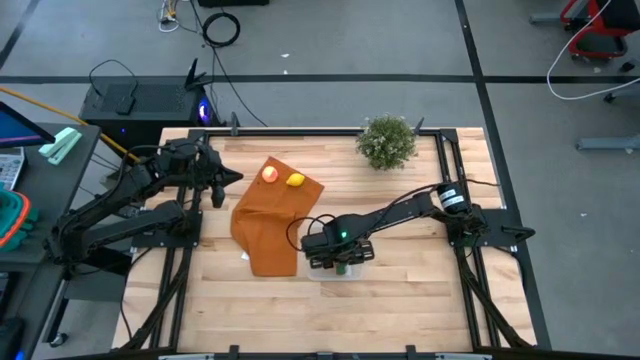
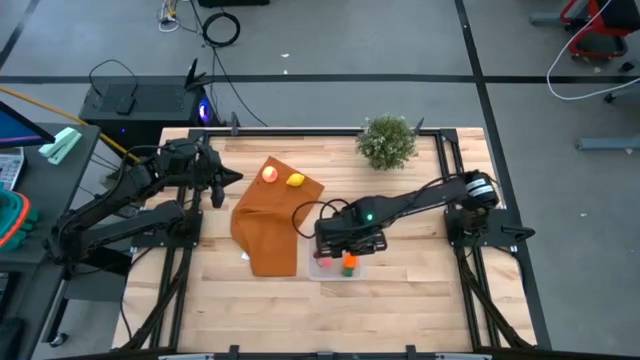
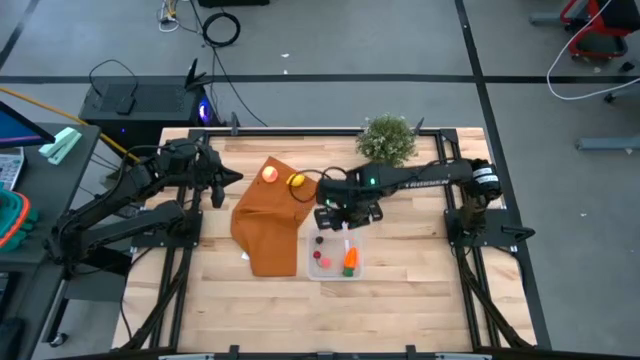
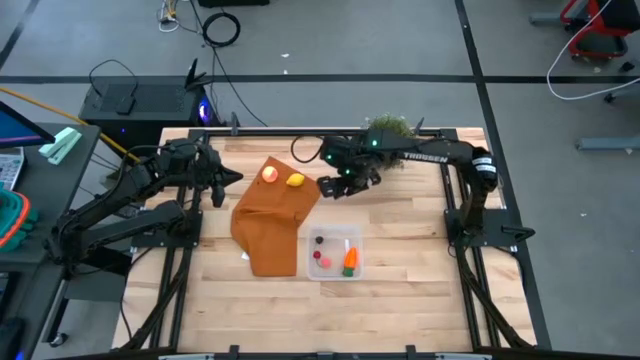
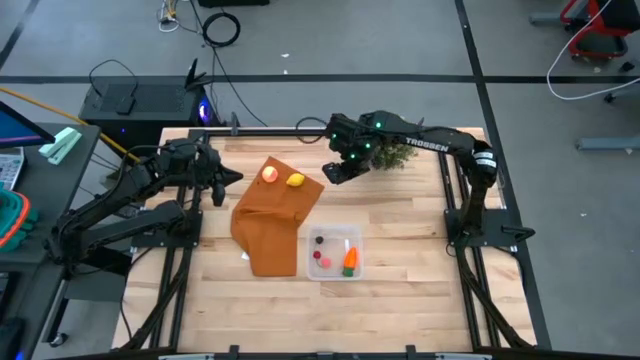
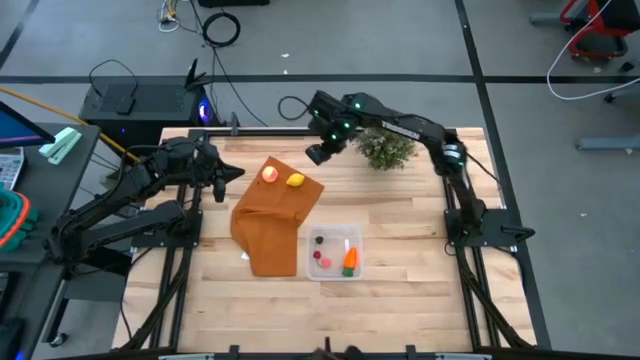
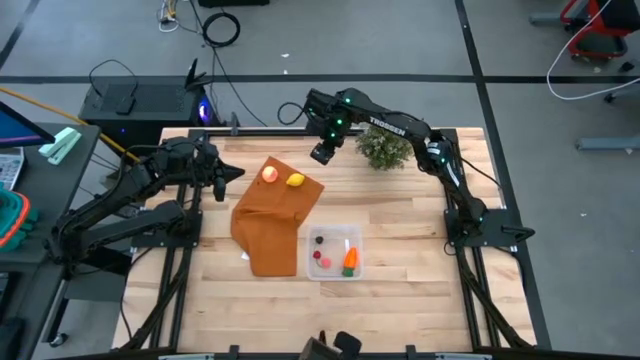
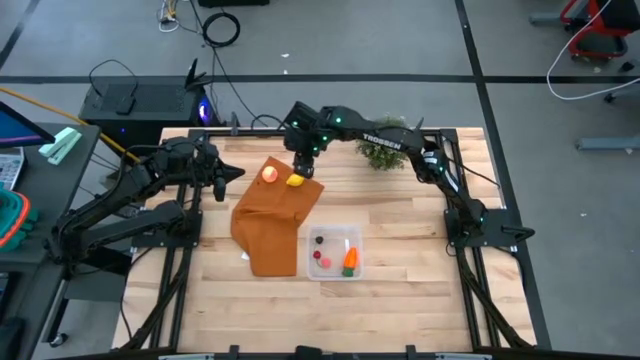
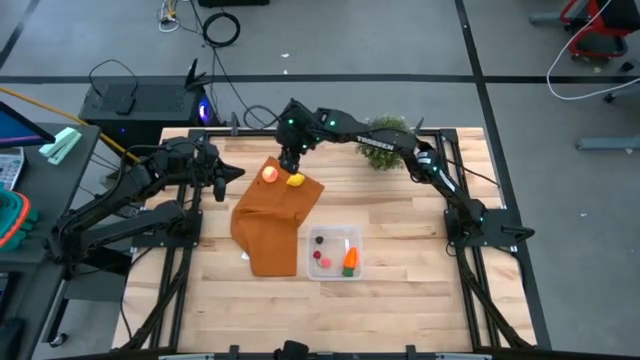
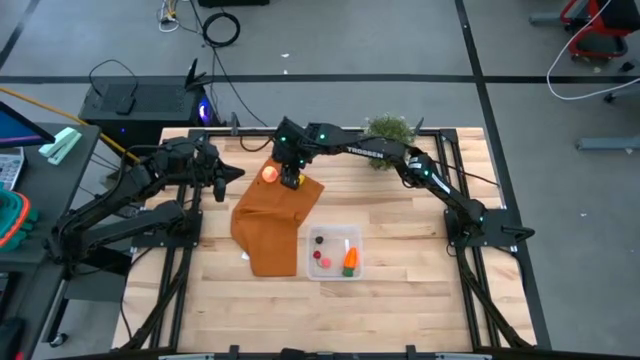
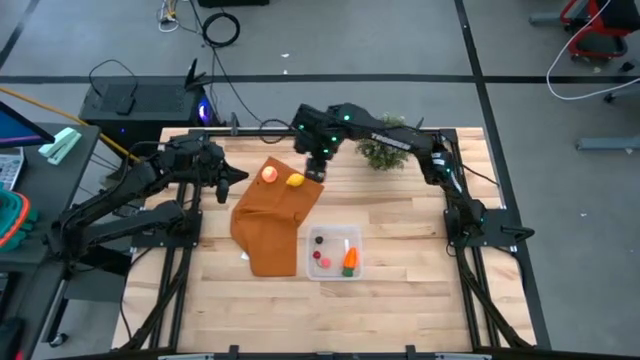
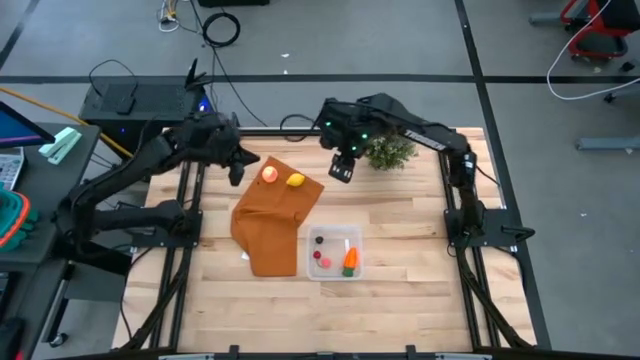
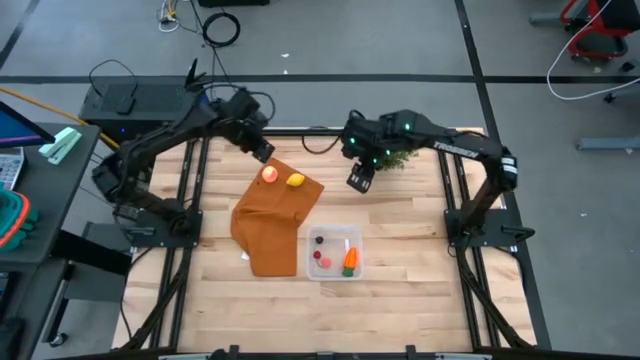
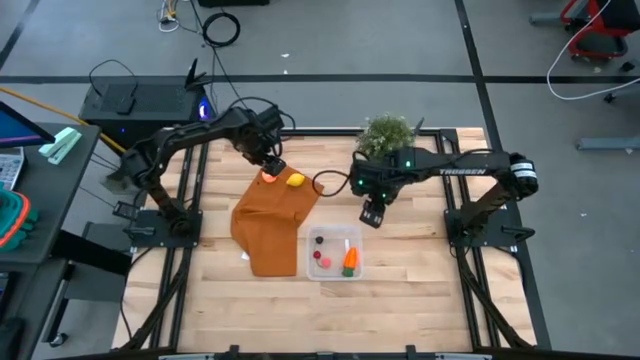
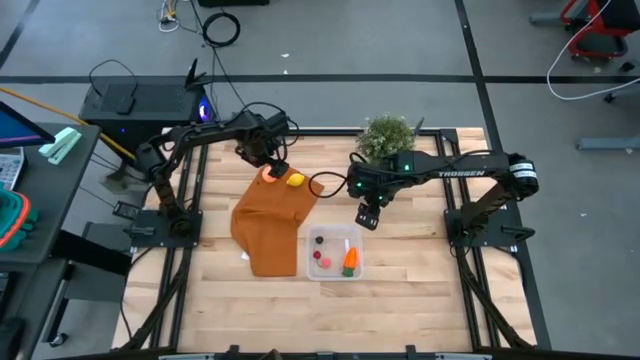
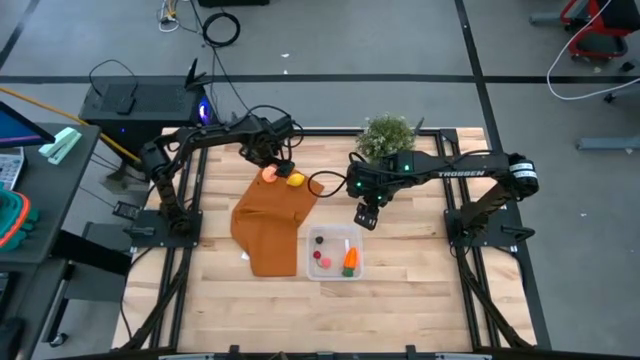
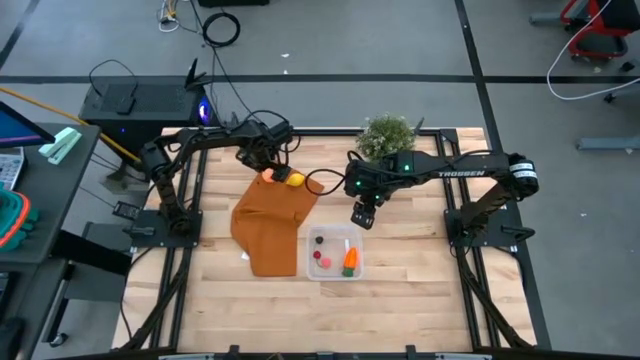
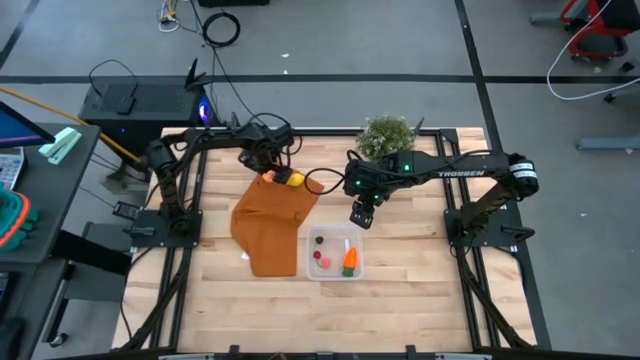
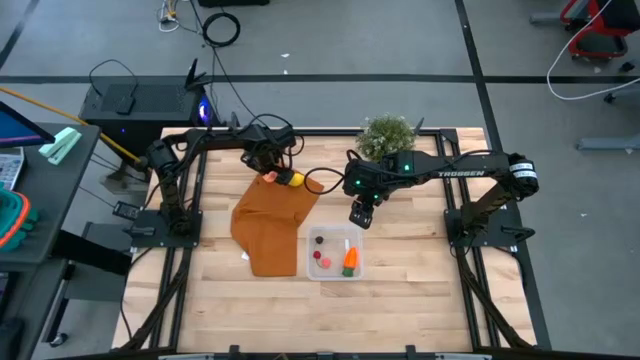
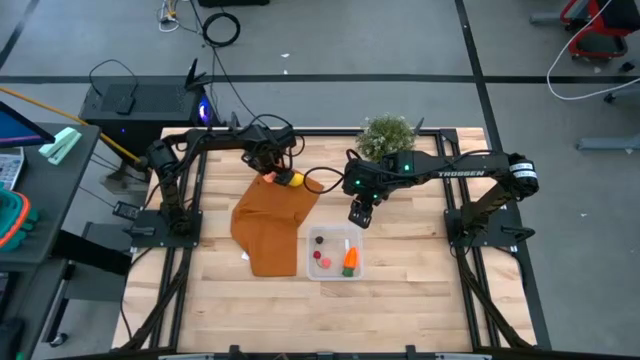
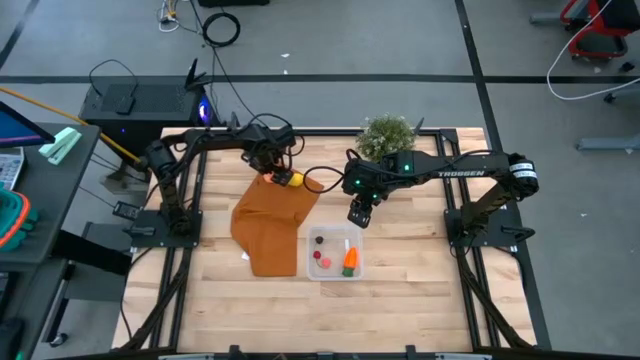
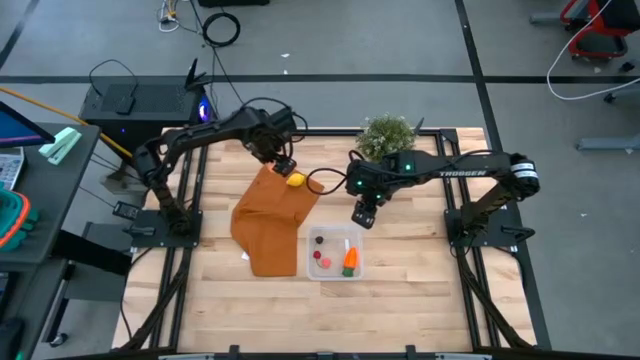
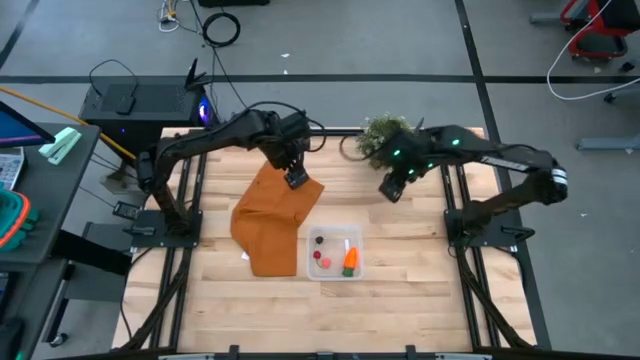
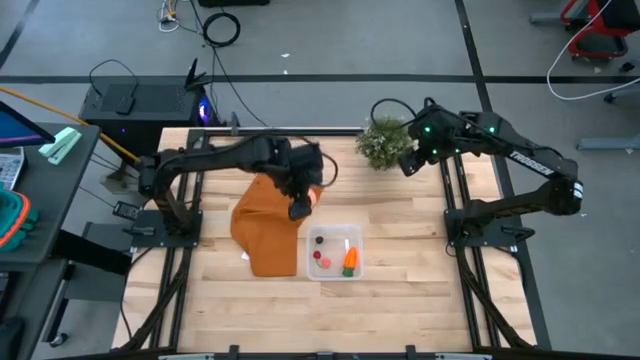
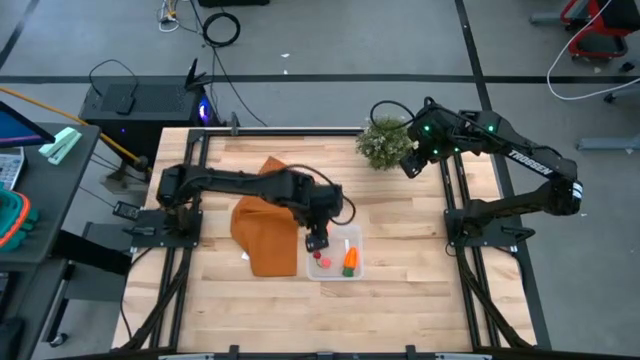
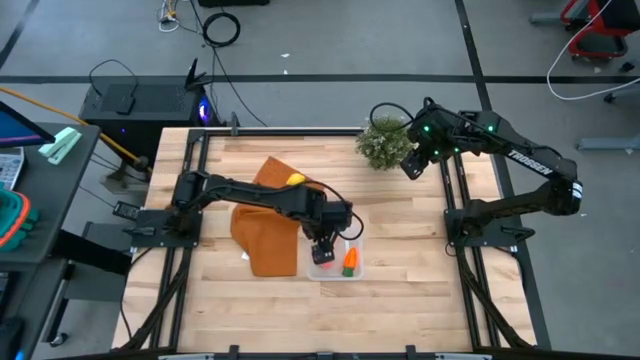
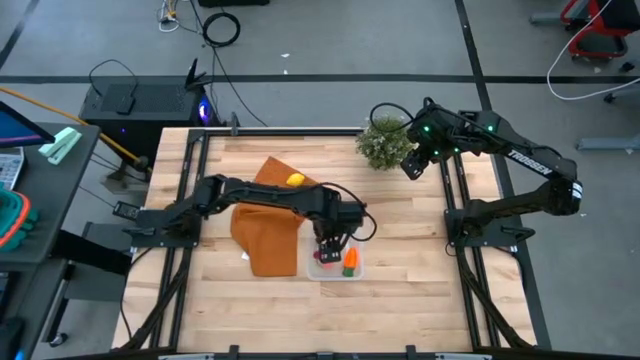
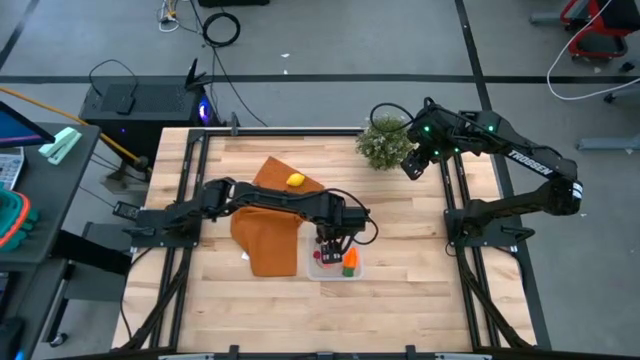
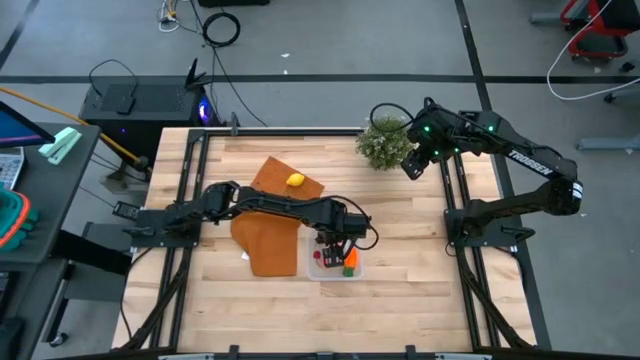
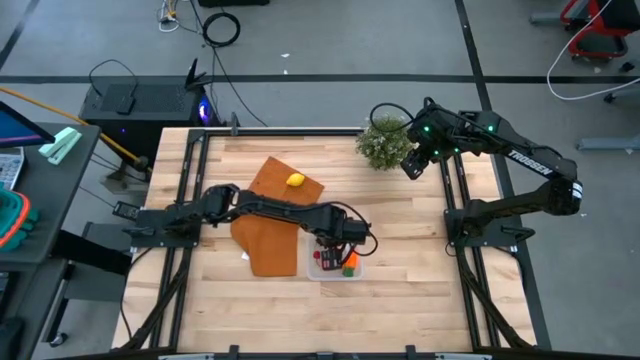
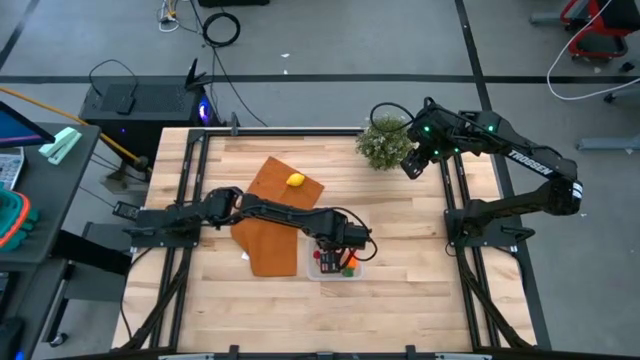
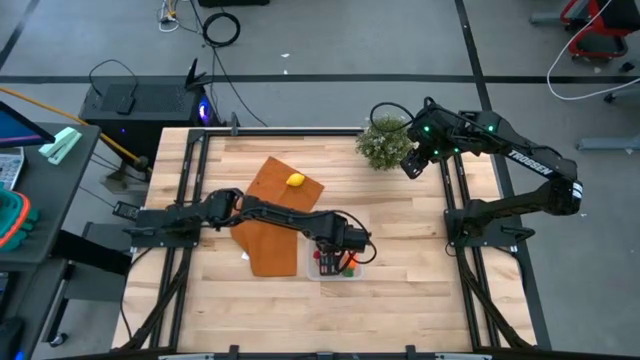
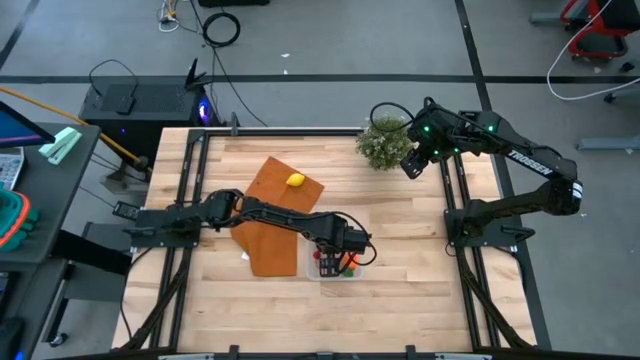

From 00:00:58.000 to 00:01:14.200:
Task: Pick and placing Produce into tupperware
Put the pink peach into the transparent bin

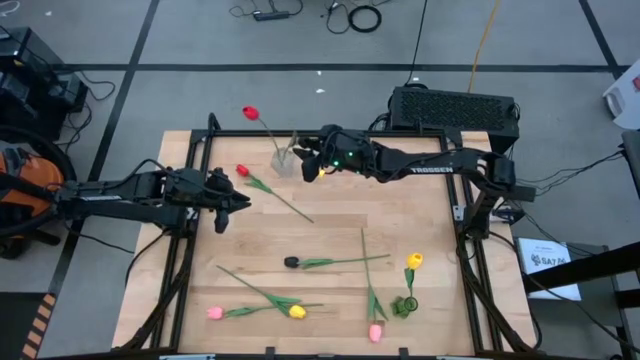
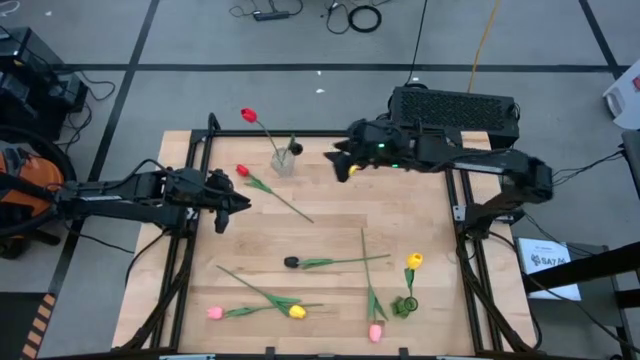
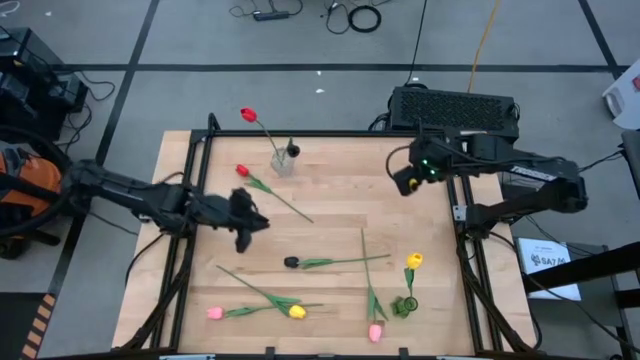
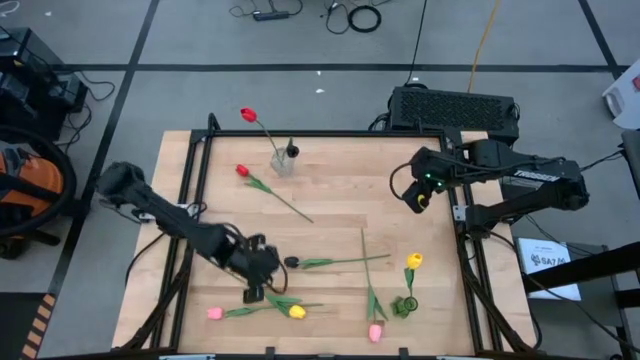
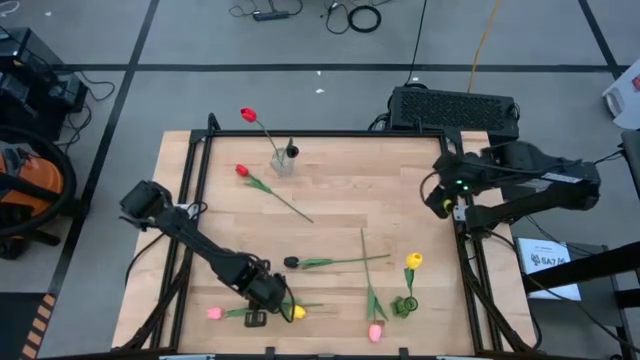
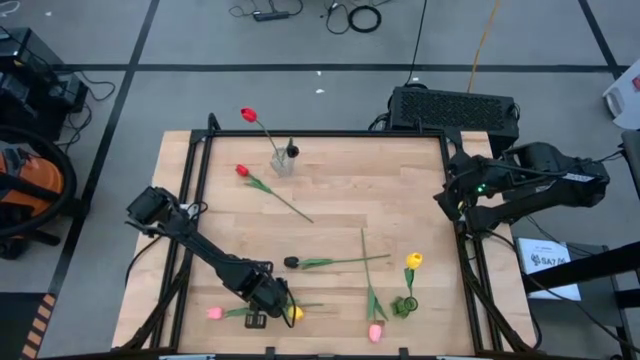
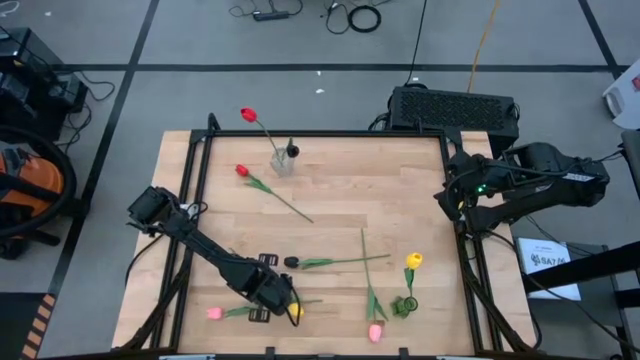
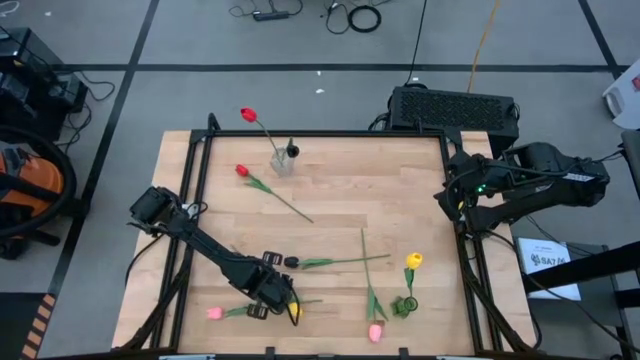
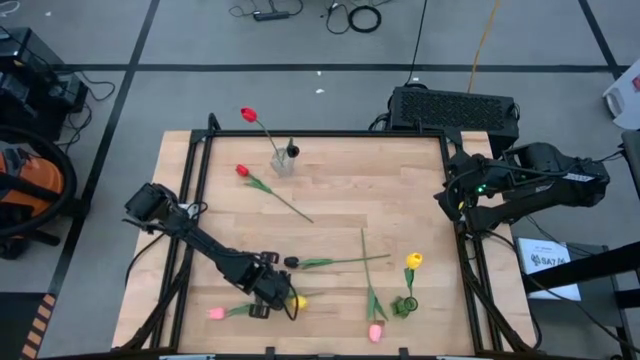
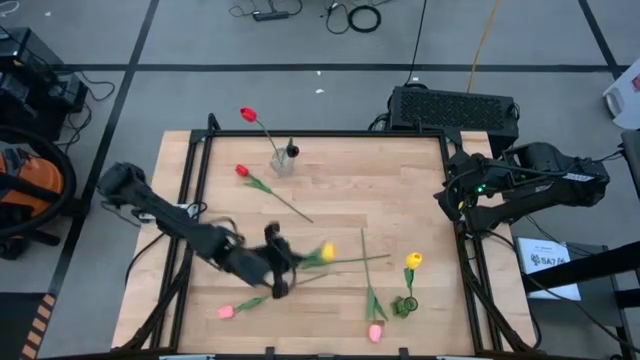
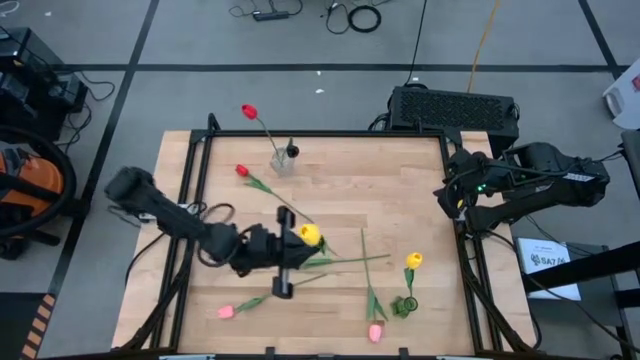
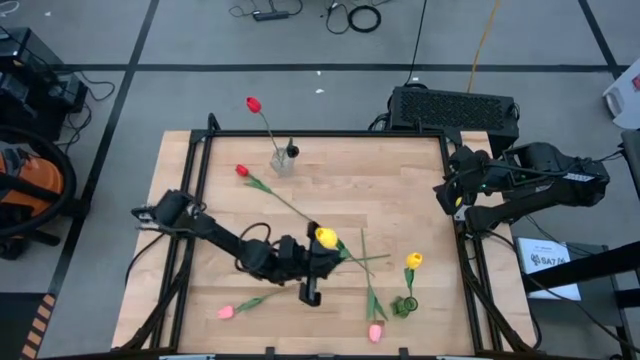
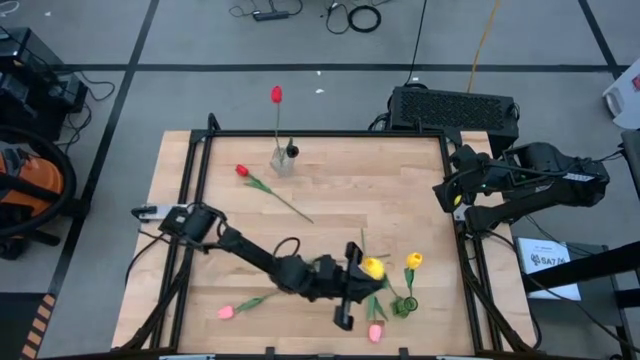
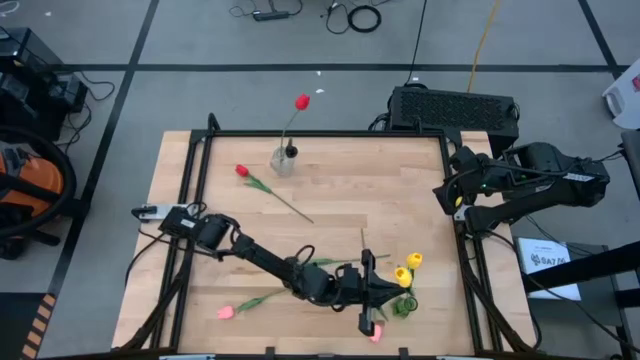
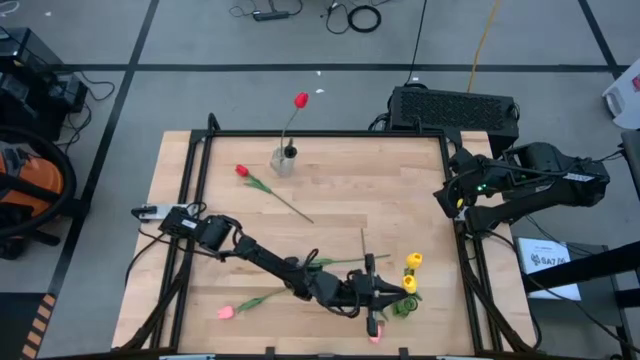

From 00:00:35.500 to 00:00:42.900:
Task: Sort flowers into vase by color
Put the yellow tulip into the green flower vase
